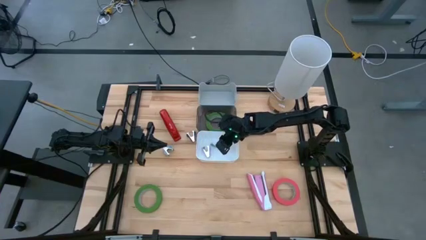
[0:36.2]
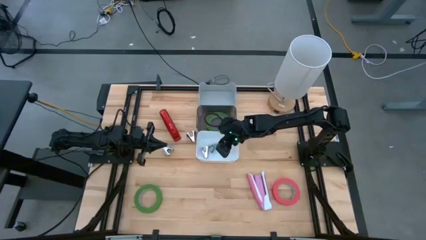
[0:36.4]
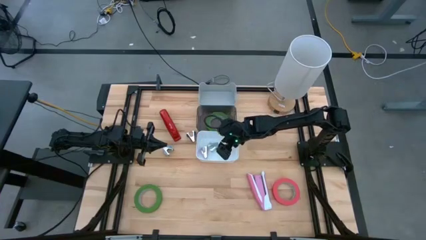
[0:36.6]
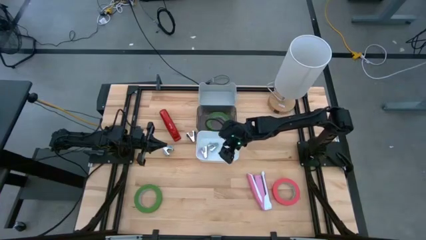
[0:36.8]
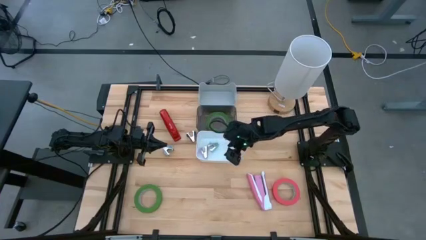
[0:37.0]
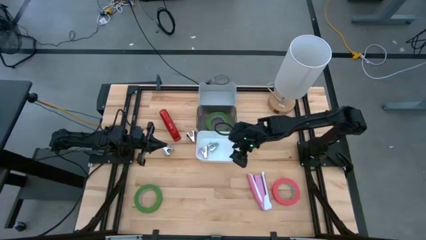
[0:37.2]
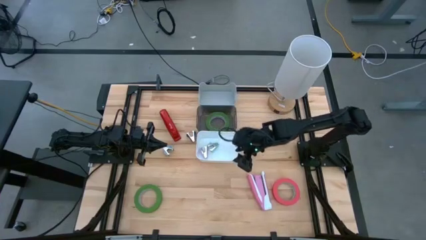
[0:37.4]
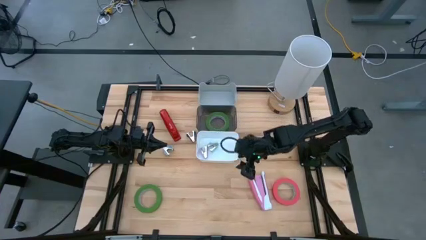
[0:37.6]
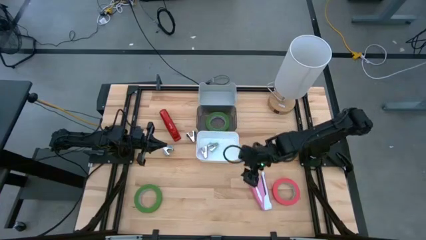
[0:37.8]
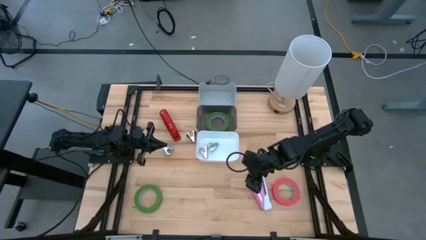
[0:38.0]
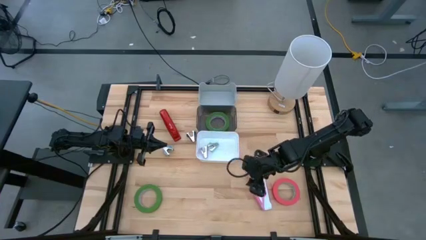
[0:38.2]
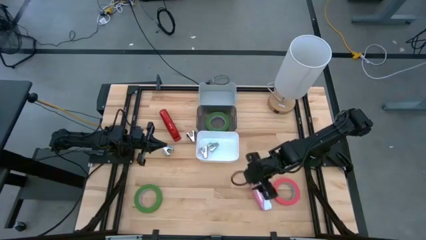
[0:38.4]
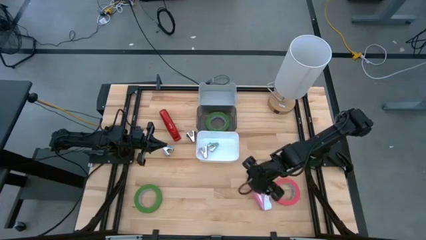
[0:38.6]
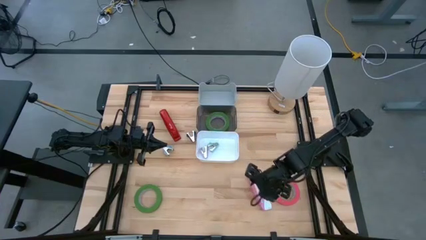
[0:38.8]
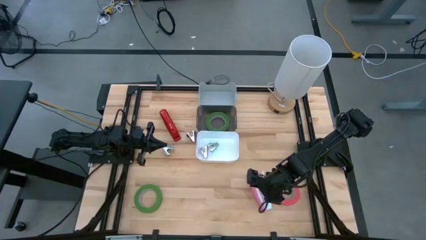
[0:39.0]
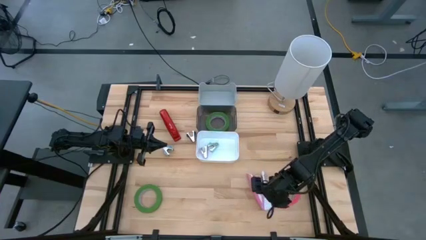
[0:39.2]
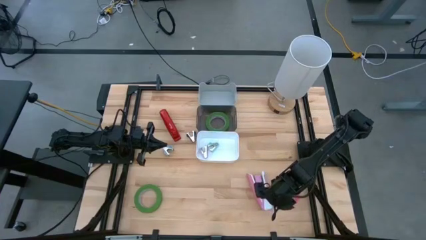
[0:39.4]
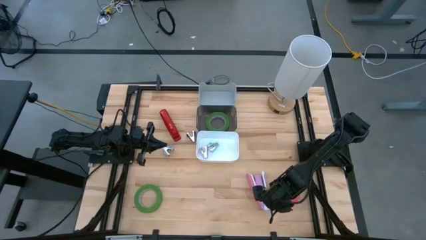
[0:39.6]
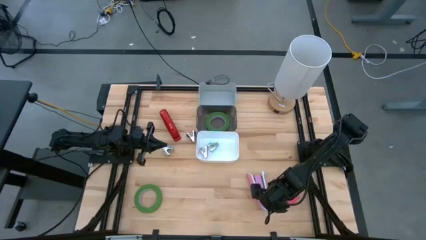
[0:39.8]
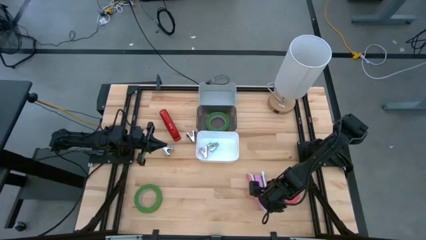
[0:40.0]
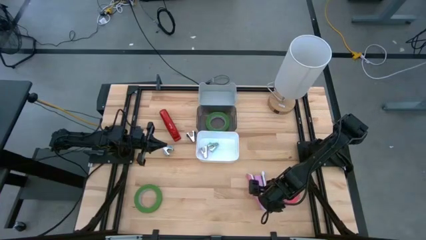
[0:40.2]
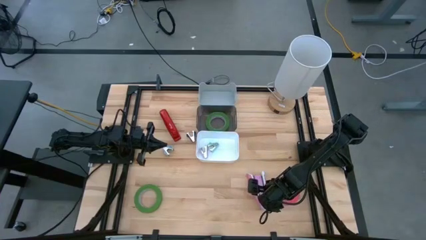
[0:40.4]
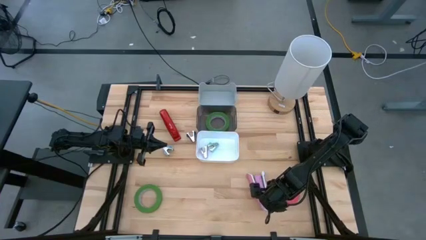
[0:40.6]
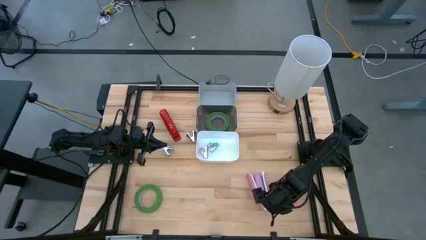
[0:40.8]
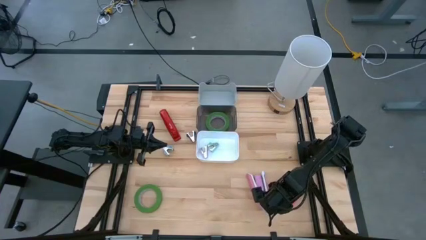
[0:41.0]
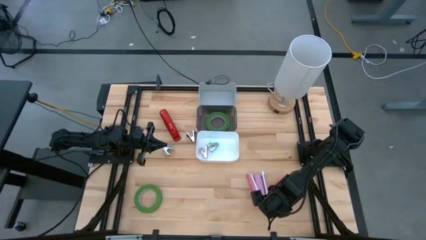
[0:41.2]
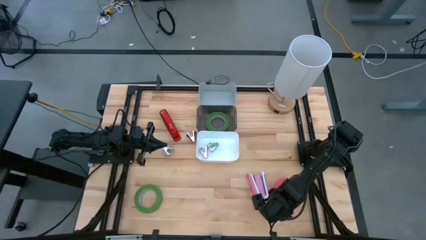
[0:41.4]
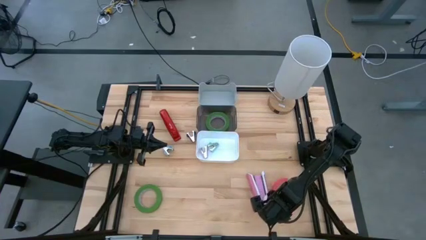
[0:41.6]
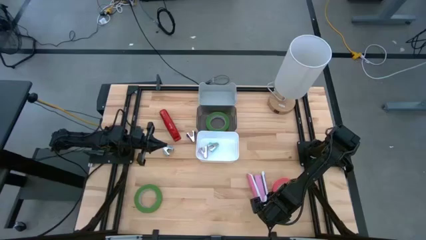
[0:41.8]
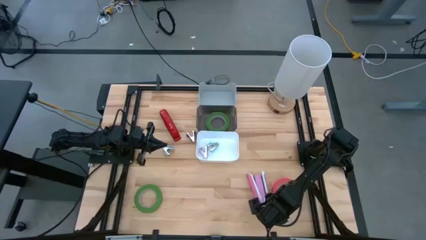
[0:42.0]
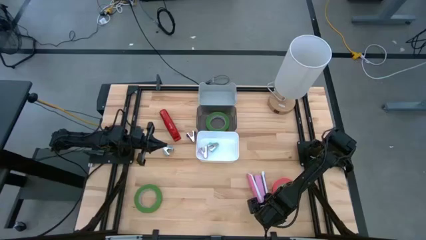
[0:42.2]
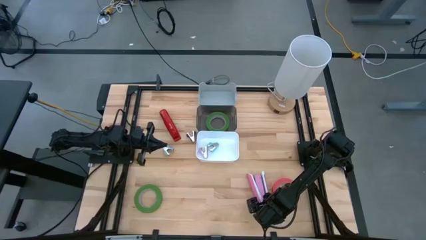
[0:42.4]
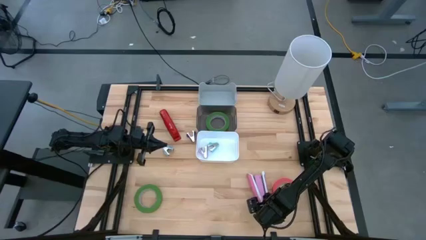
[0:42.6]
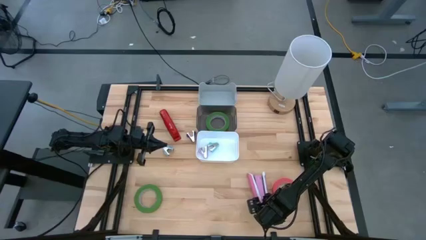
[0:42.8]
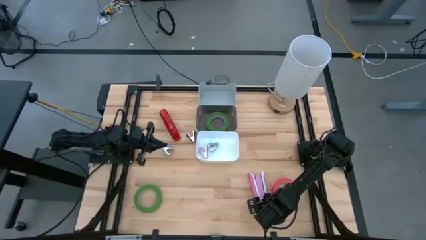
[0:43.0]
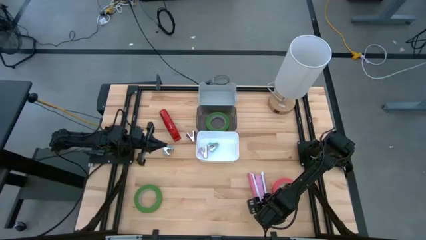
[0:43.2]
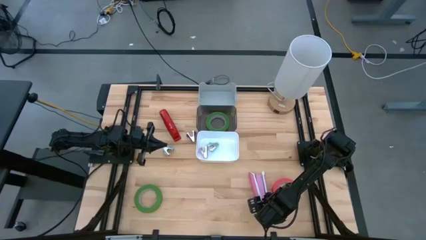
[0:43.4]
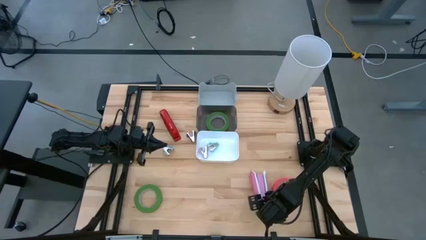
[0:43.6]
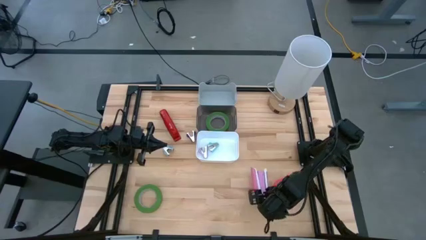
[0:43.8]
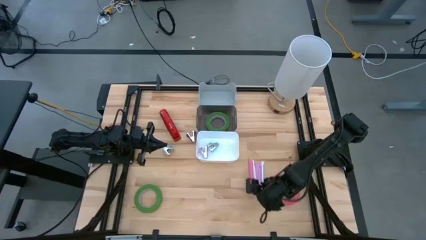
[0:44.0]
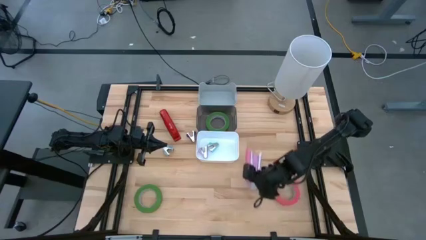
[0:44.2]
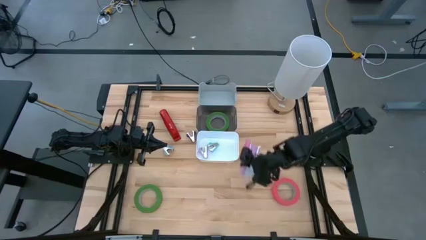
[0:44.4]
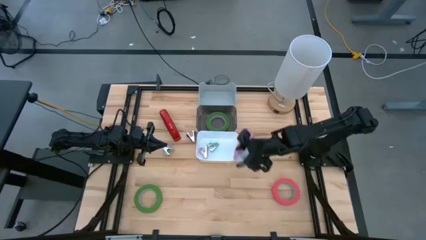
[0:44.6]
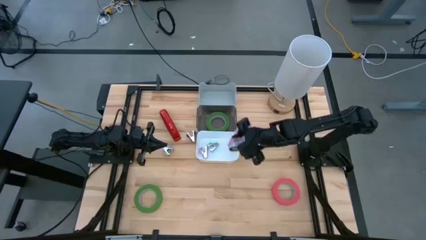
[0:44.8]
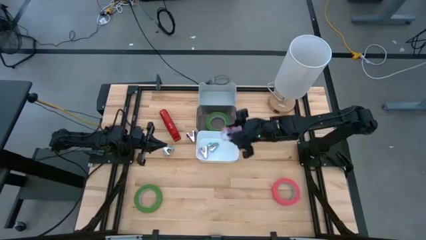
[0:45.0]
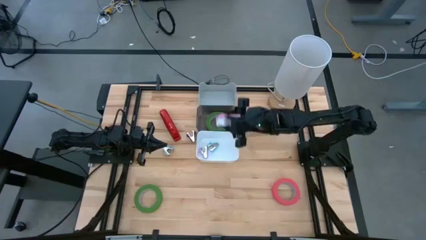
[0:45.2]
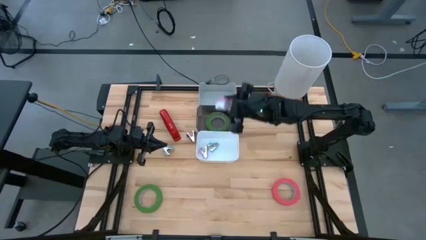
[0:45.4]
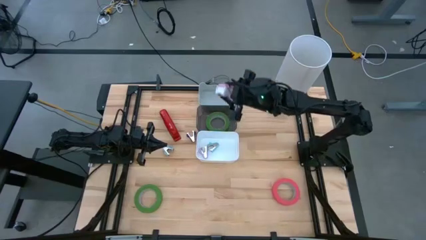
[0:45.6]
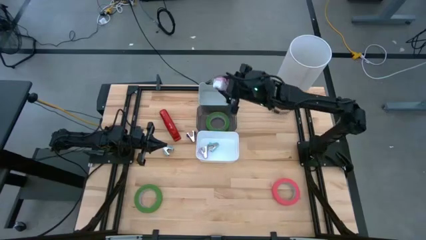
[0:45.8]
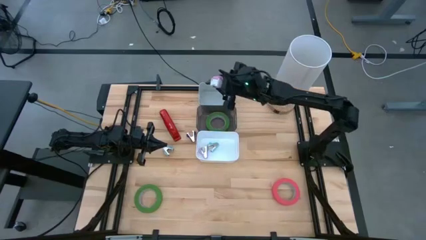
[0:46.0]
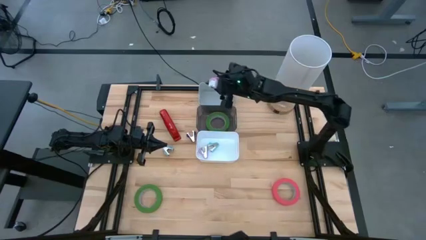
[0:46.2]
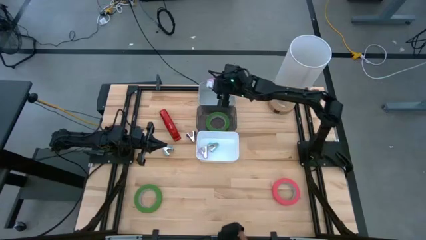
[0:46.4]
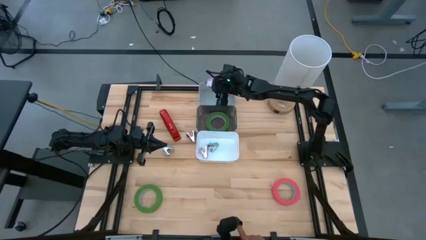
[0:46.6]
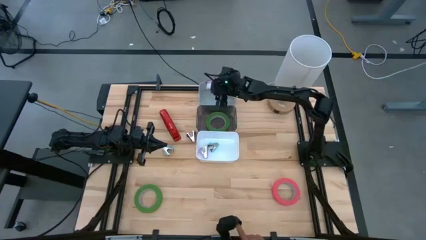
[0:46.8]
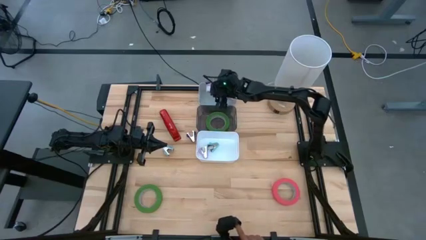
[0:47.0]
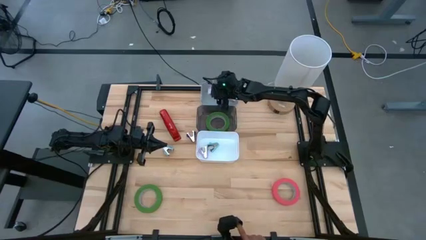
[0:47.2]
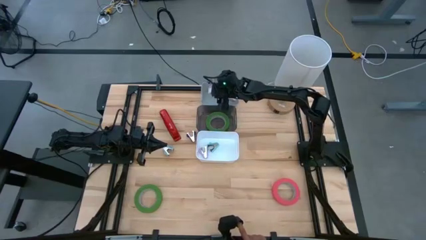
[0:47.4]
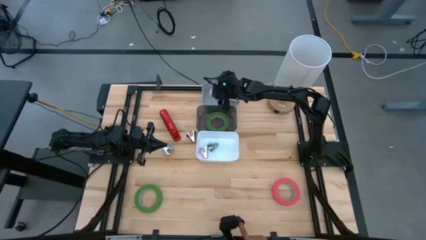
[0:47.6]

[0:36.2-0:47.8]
Task: Pick and place Stapler, Stapler remover, tape
Put the pink stapler in the gray bin
